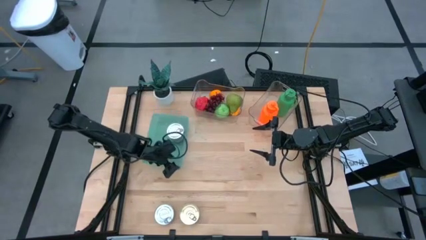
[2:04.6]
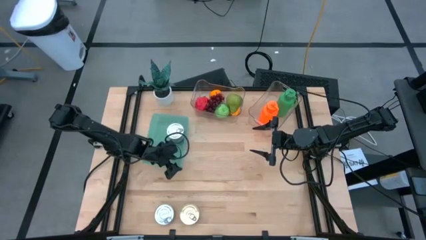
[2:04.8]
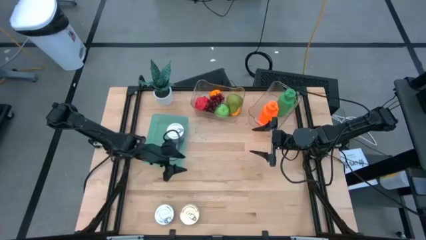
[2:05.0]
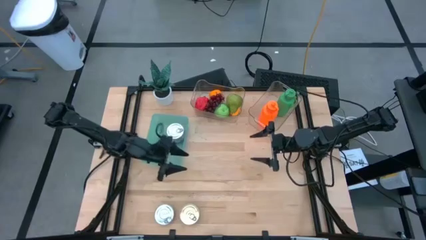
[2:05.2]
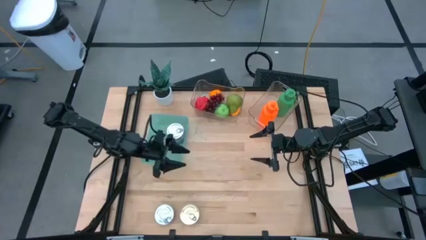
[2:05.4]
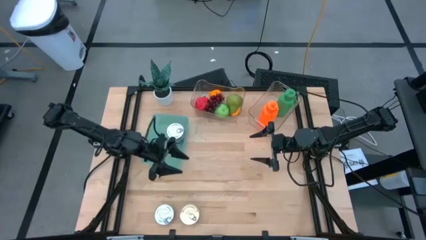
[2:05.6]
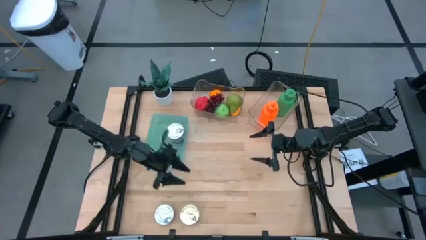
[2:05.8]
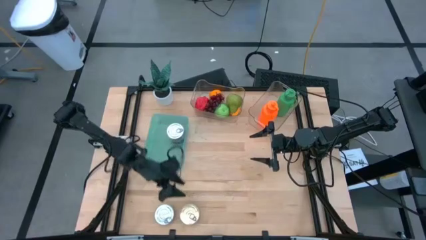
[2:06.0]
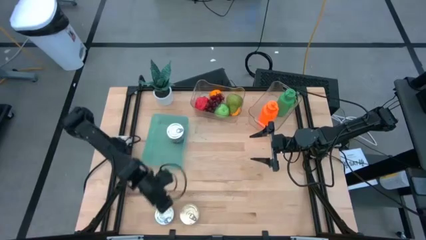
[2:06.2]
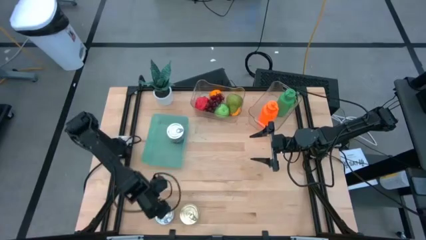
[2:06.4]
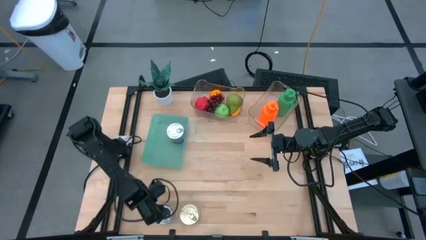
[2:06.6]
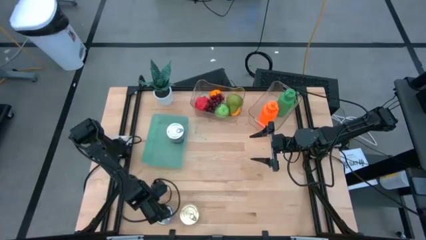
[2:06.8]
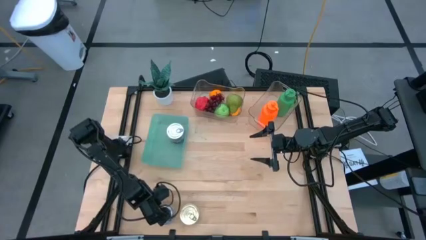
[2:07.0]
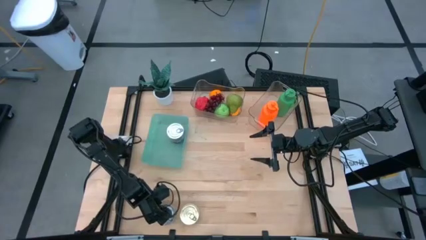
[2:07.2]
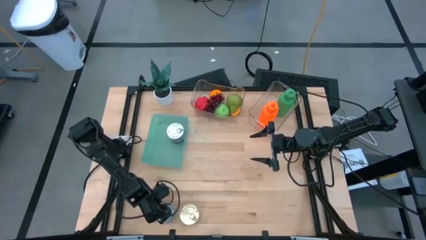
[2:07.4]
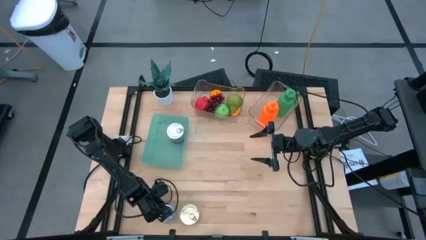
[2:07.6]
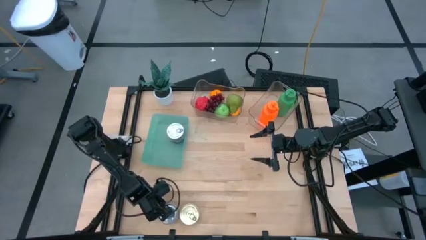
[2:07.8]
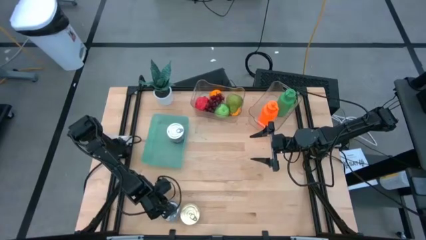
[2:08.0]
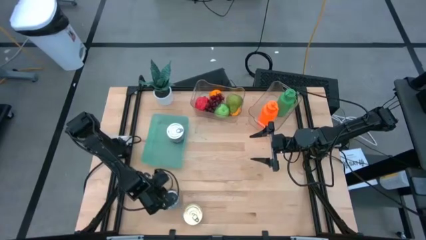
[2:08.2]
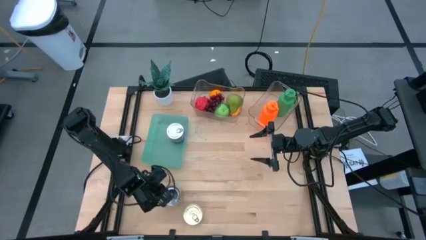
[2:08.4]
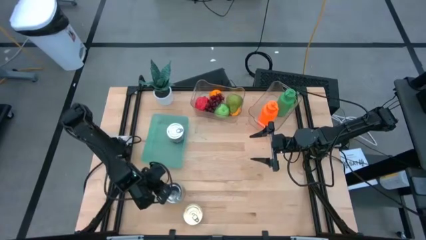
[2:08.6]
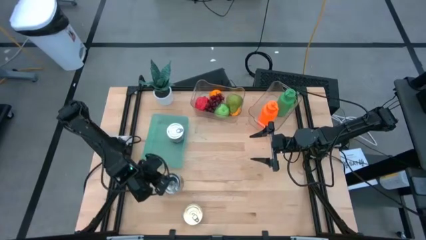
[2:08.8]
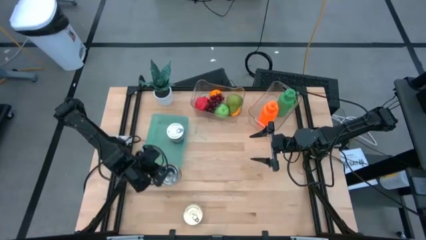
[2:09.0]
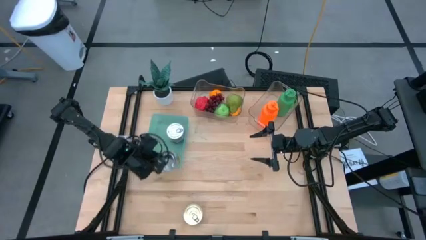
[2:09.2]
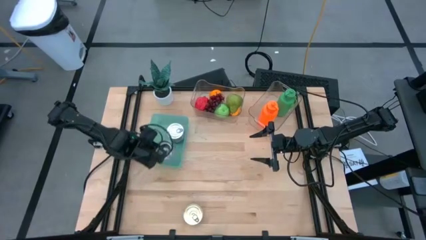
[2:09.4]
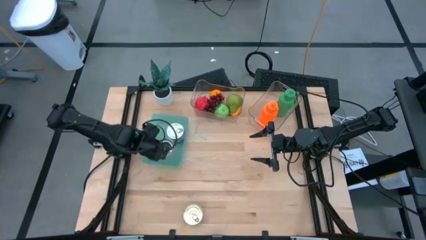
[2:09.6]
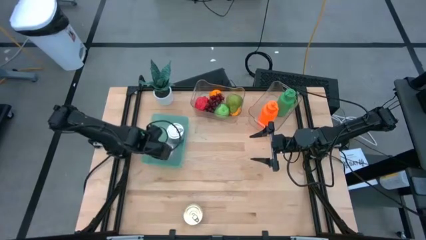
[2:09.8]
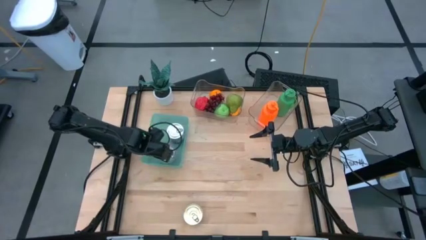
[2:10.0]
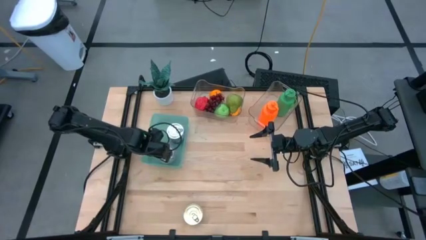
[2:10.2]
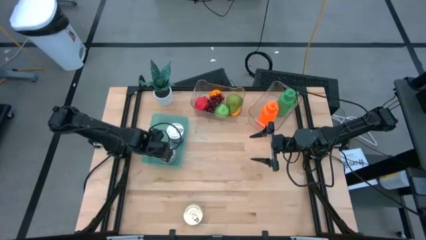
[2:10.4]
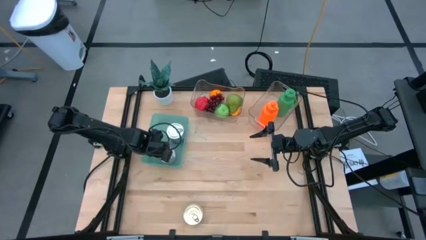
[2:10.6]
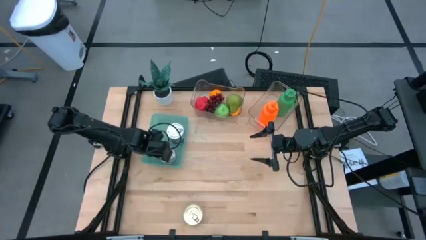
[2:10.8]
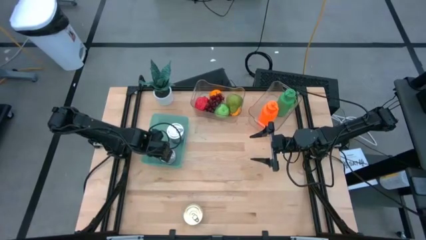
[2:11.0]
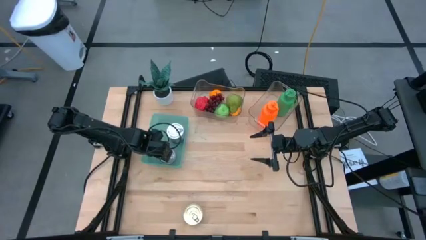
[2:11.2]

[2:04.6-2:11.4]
Task: Pick & Place Food Item
Put the green tuna can into the green bin

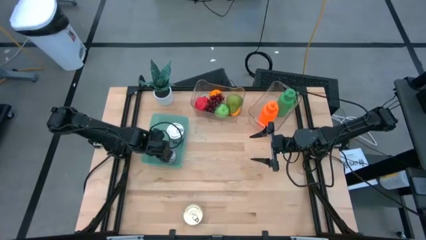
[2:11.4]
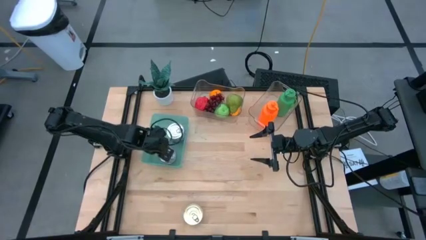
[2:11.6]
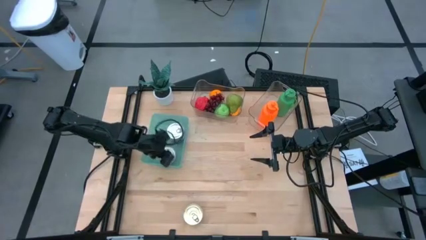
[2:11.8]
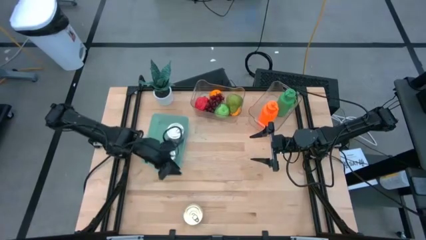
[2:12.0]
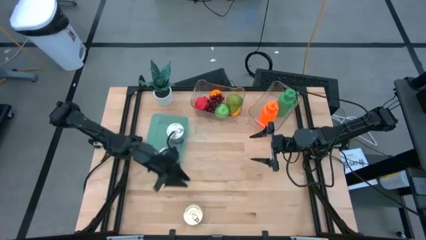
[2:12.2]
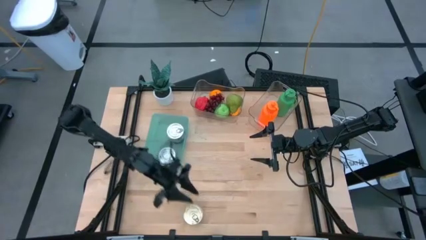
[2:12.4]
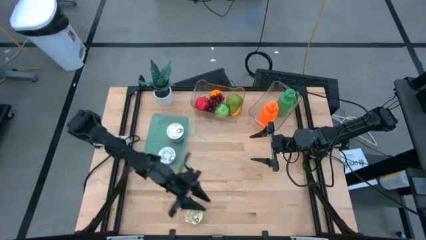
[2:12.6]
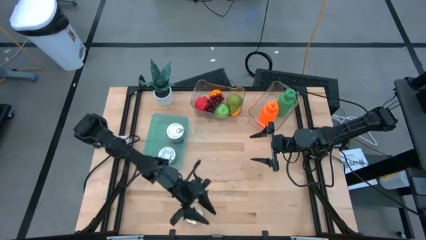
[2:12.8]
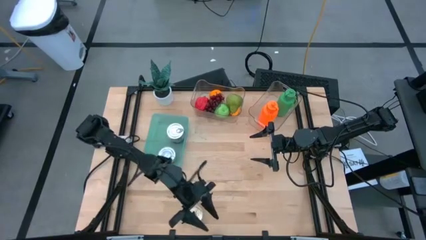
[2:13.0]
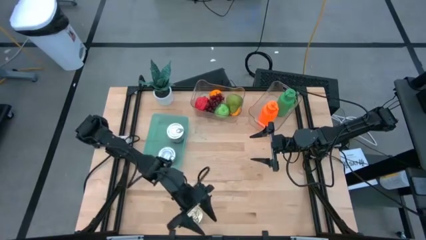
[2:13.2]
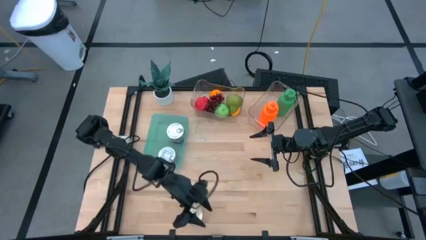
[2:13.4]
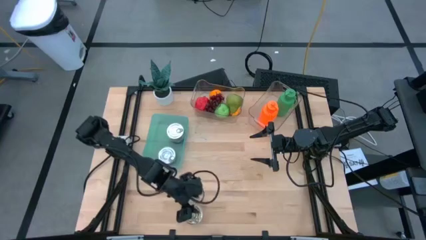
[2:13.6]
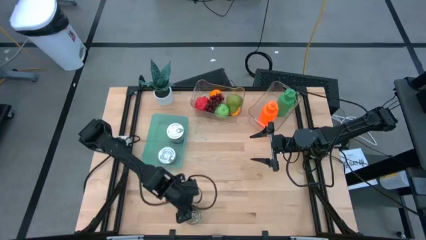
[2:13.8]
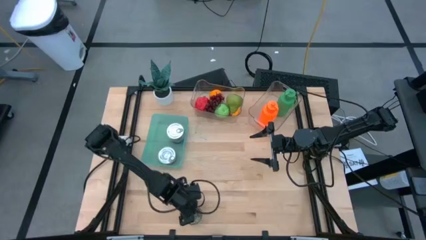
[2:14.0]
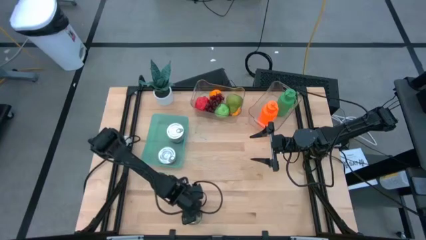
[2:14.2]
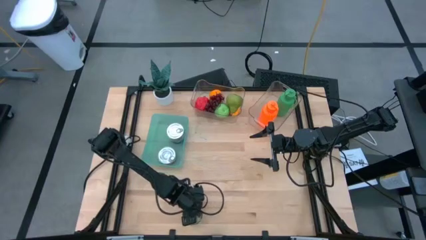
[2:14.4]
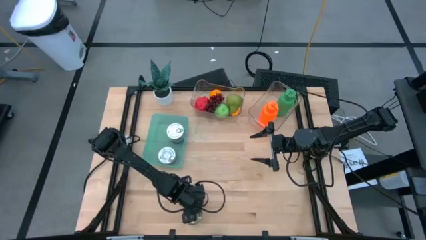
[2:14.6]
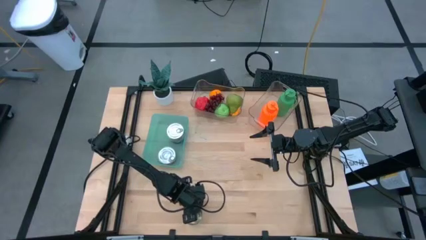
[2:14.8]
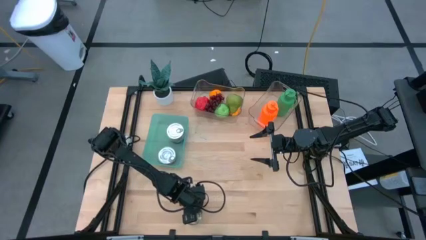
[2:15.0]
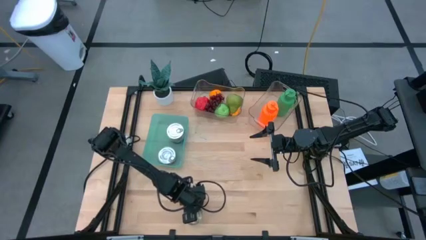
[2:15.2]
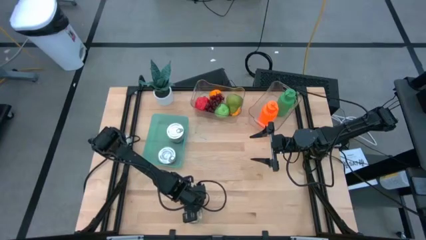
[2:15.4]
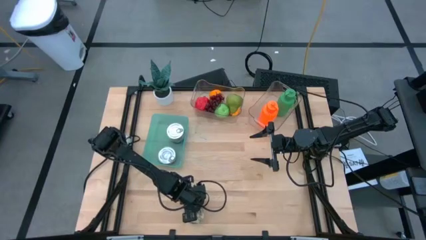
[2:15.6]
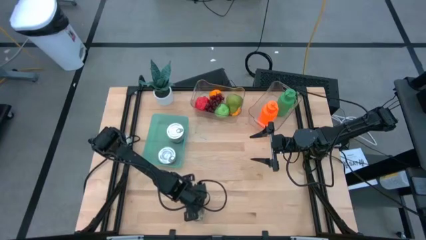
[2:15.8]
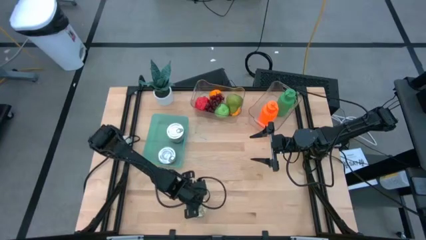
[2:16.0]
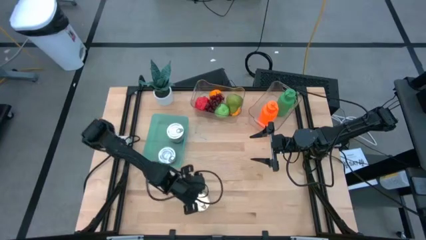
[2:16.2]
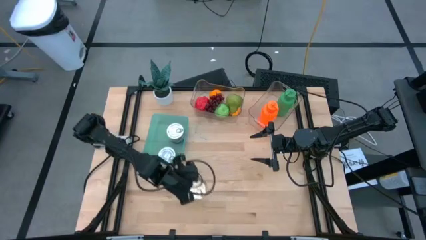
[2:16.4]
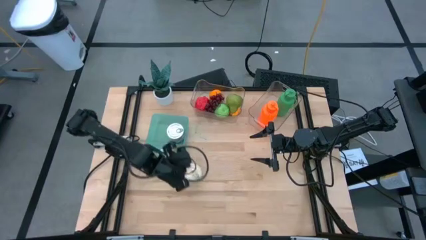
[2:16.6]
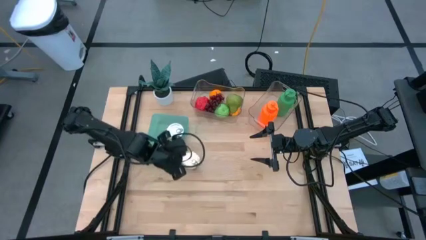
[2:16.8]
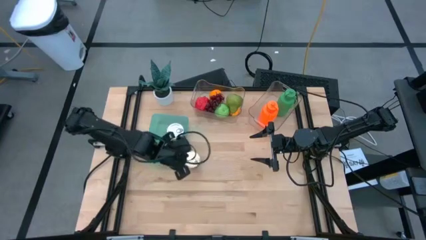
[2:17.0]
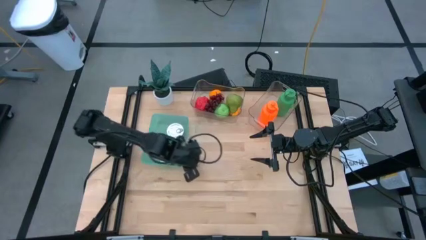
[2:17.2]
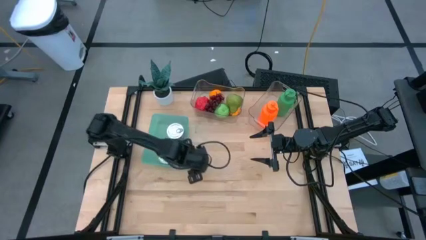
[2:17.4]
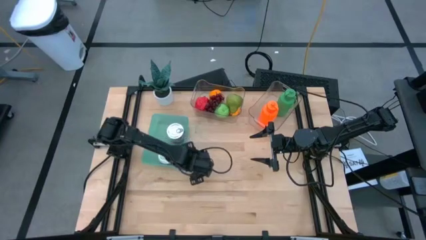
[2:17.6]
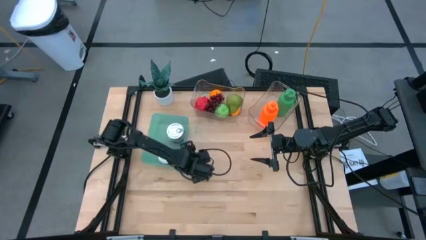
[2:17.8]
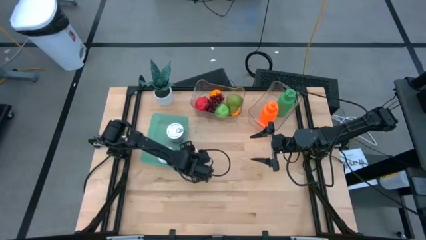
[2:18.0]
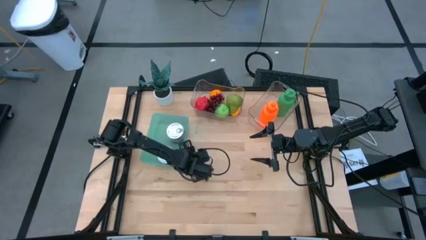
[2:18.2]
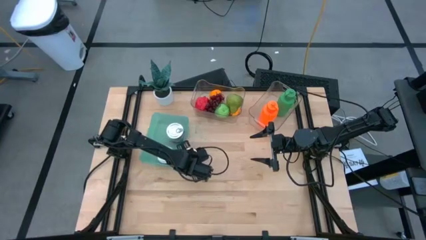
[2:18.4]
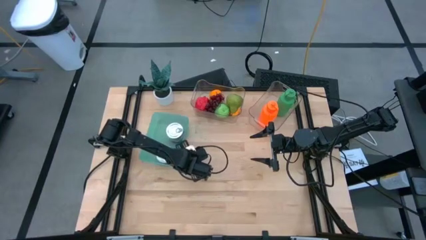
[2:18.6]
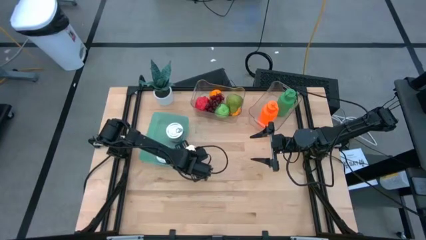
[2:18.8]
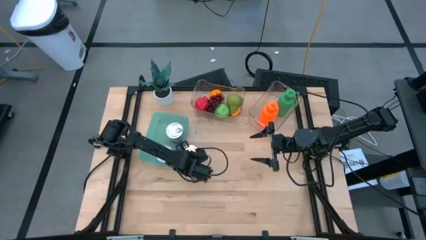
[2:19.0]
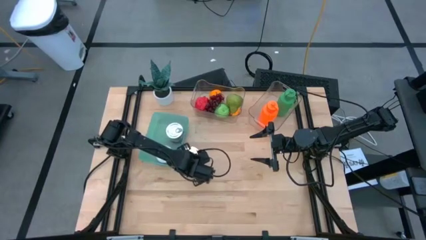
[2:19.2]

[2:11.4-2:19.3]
Put the blue pink tuna can into the green bin

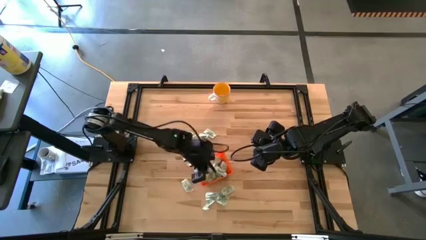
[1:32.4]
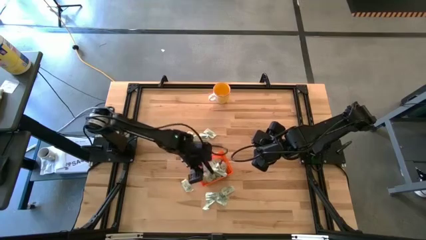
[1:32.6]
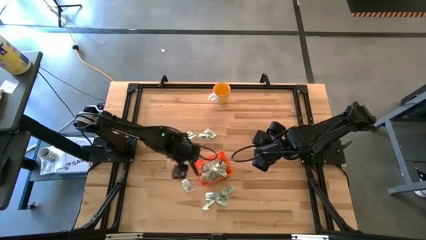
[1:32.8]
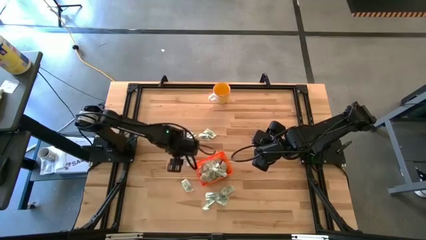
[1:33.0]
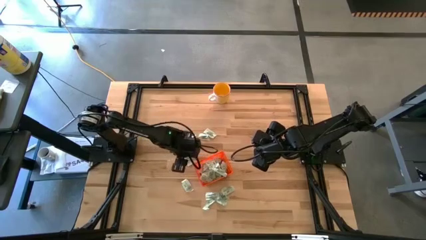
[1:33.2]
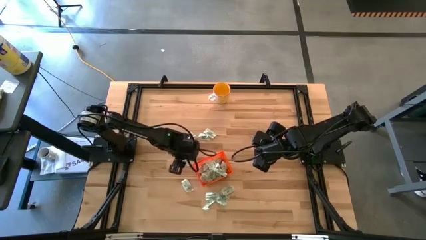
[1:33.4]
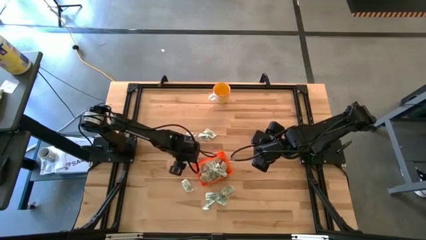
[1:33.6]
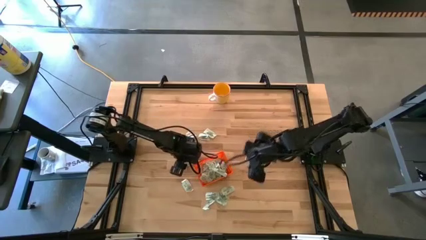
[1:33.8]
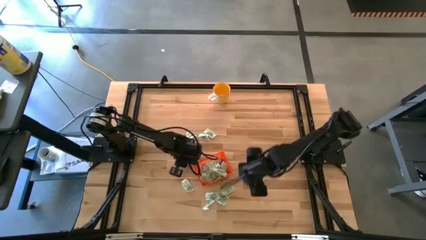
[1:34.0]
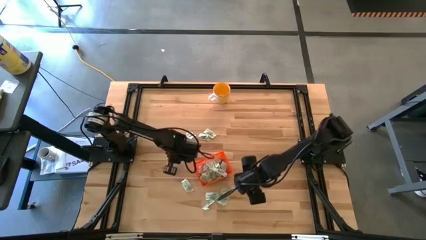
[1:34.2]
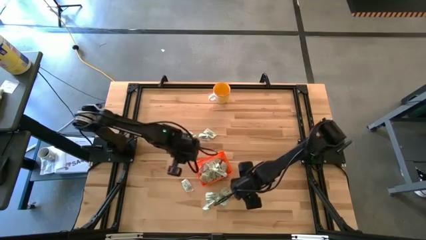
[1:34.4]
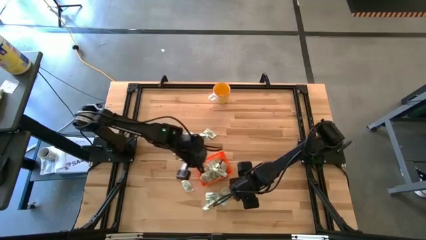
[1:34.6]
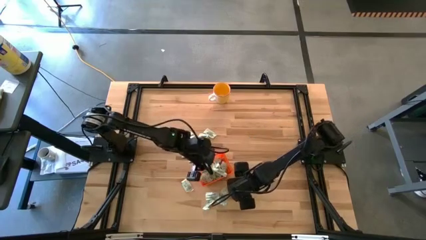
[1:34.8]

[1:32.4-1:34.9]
Task: Pick and place Stevia / Truvia into bins
Put the stevia packet into the bin
